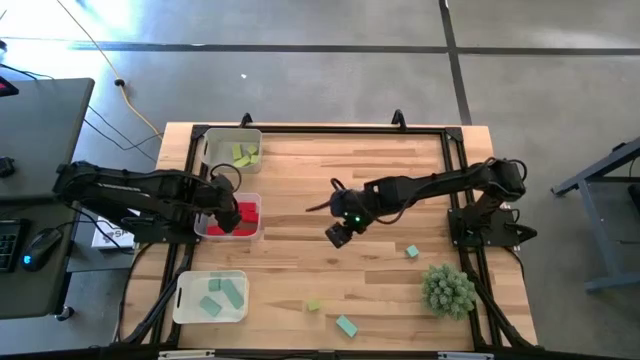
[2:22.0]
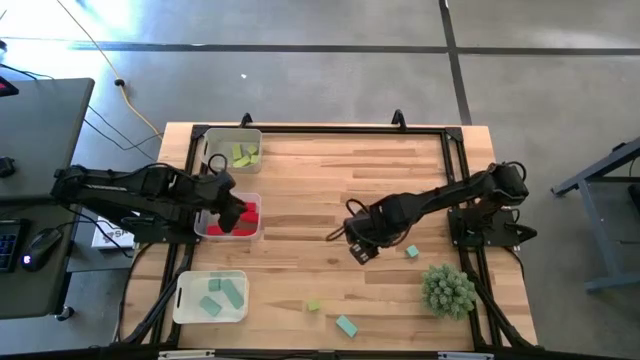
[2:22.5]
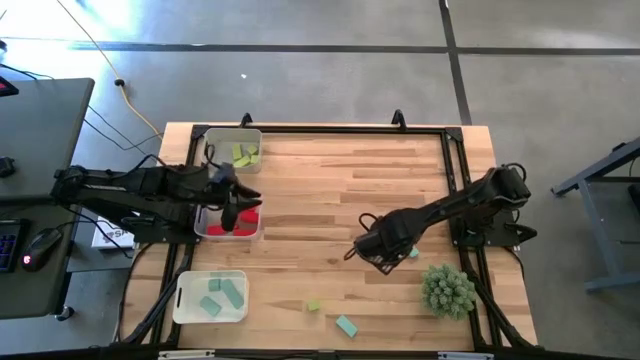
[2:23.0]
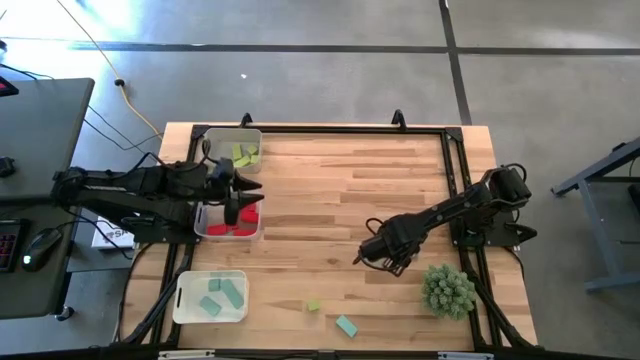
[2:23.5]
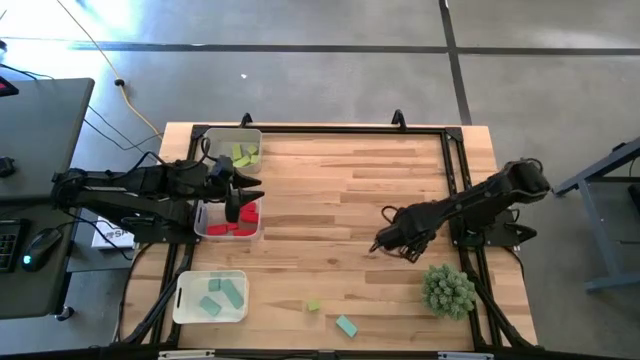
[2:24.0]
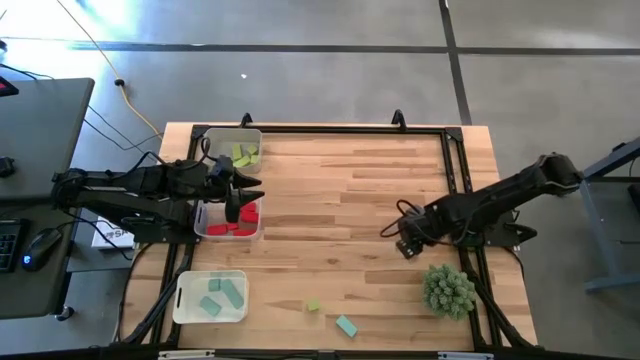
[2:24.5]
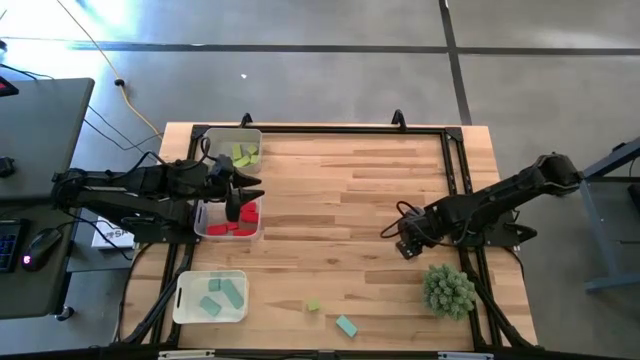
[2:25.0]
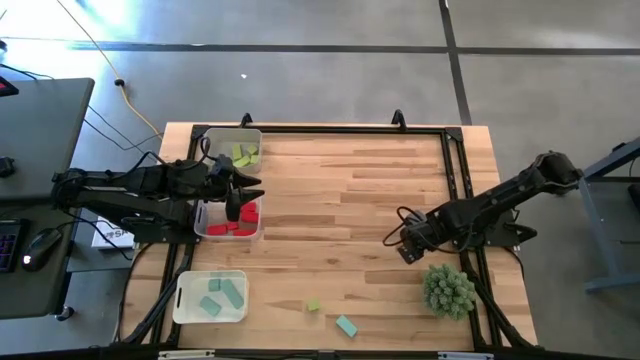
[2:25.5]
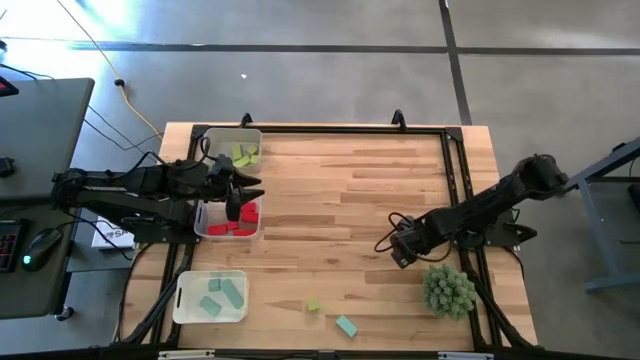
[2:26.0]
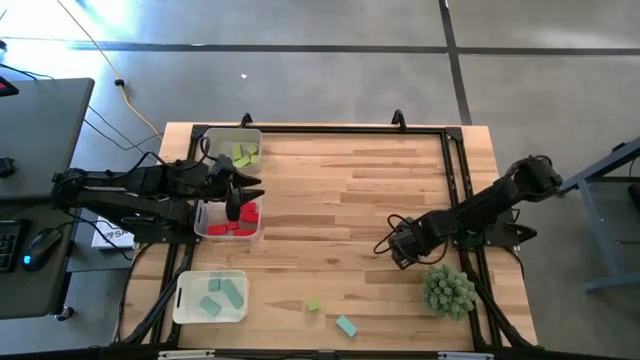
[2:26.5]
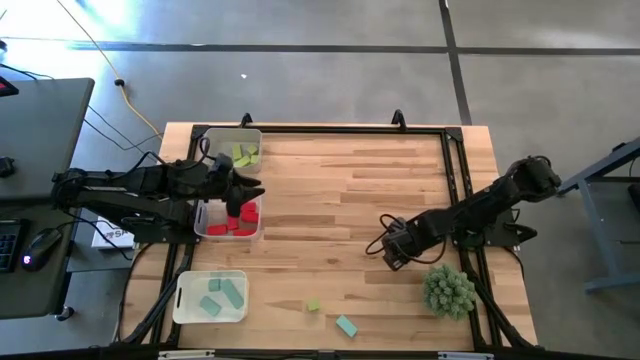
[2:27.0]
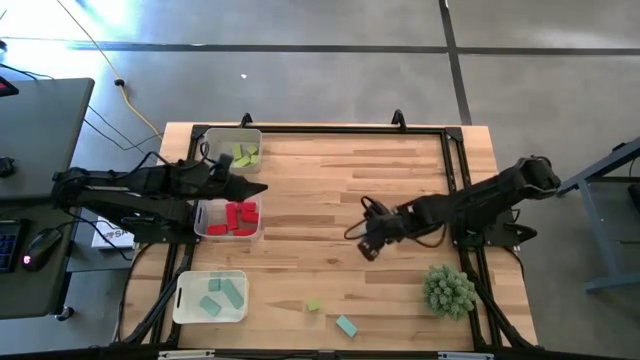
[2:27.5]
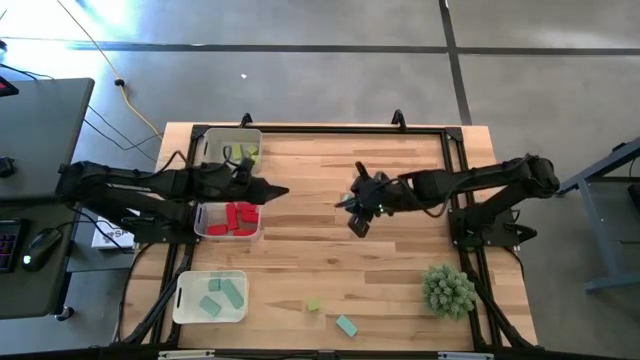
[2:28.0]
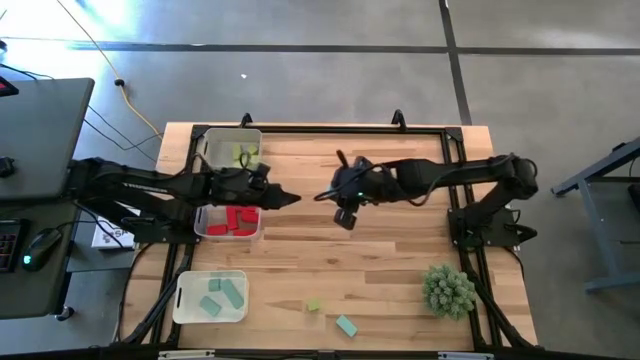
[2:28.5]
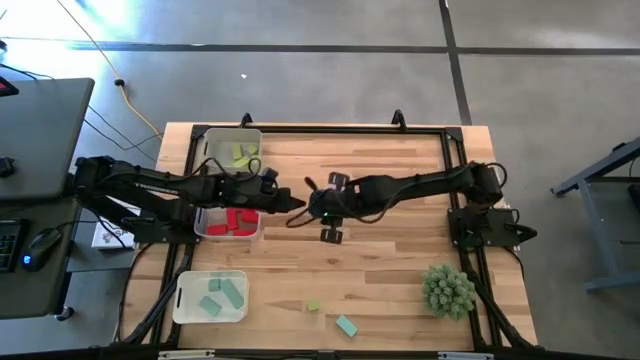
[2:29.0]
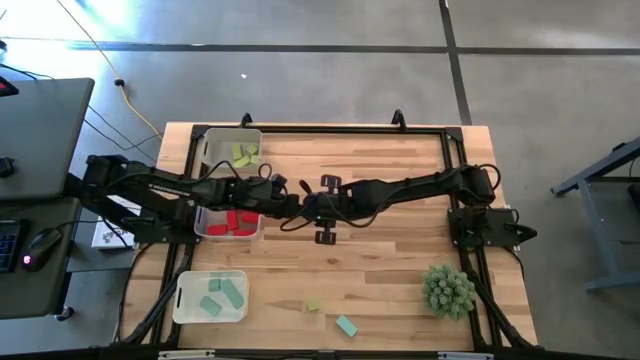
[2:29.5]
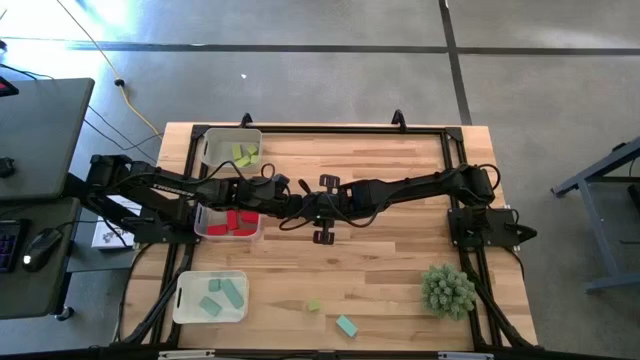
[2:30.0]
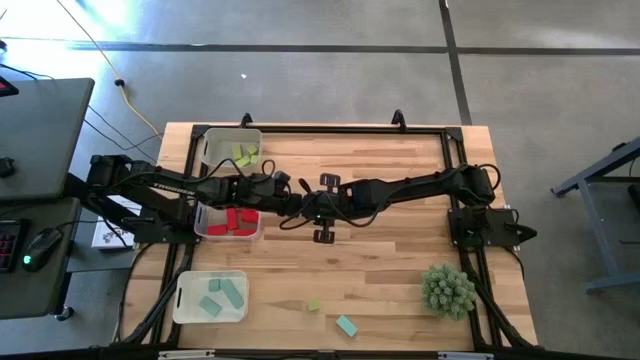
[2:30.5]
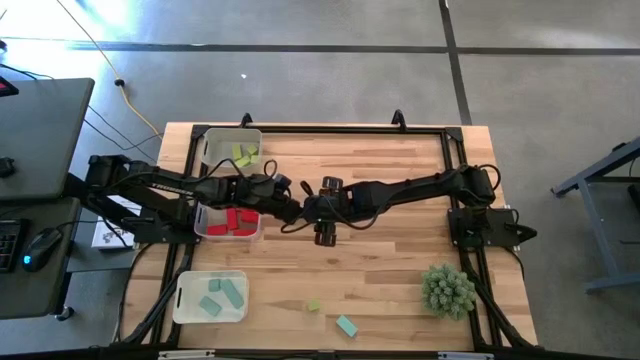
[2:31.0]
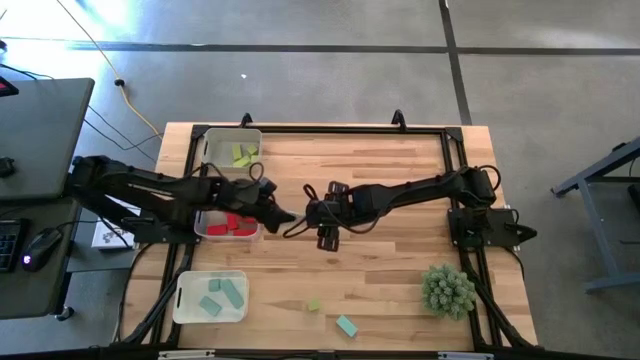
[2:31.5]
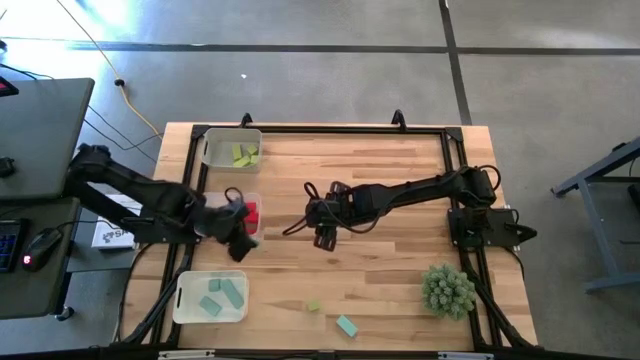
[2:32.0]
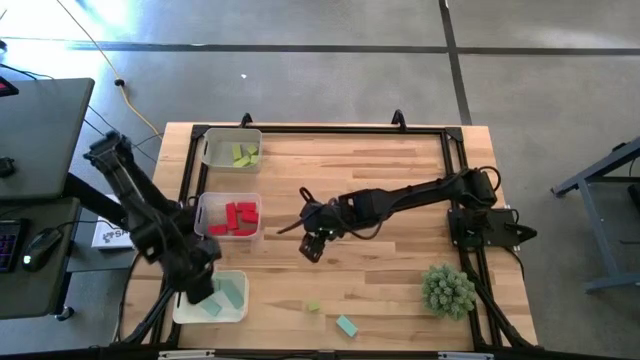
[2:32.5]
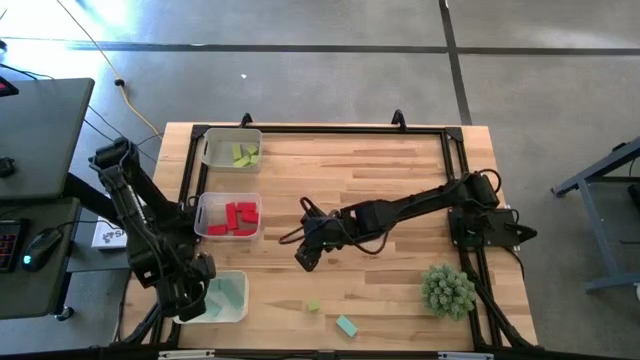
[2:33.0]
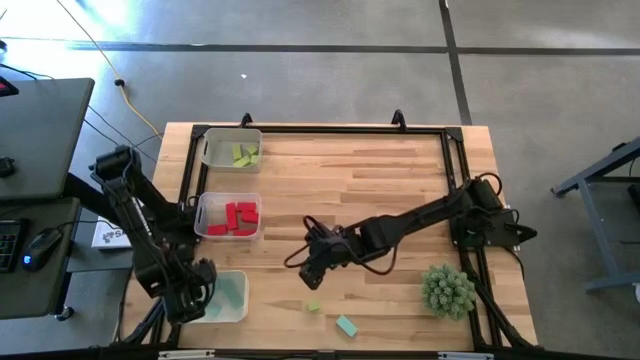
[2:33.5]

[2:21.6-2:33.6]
Task: Sort & place blocks by color
Put the light blue block into the white bin

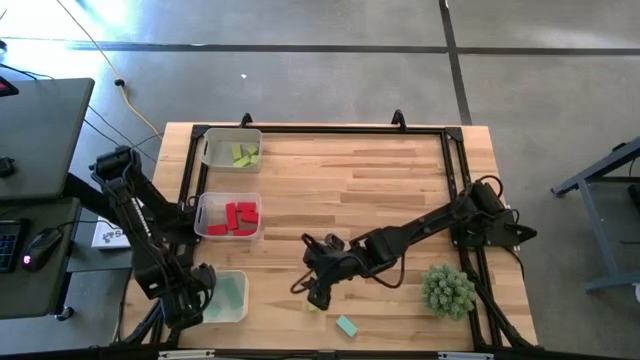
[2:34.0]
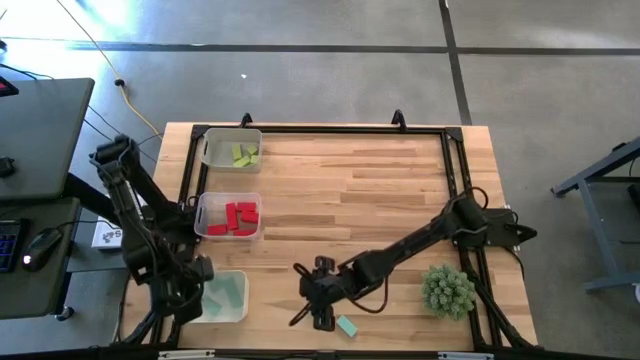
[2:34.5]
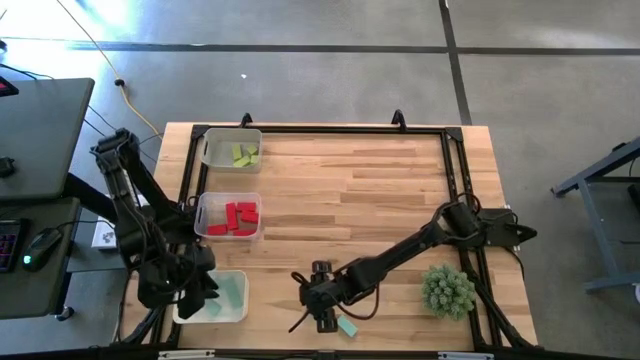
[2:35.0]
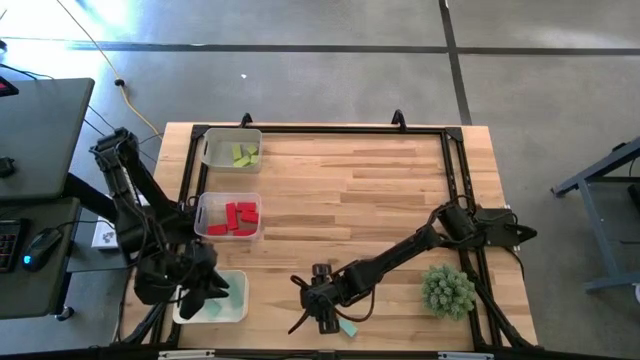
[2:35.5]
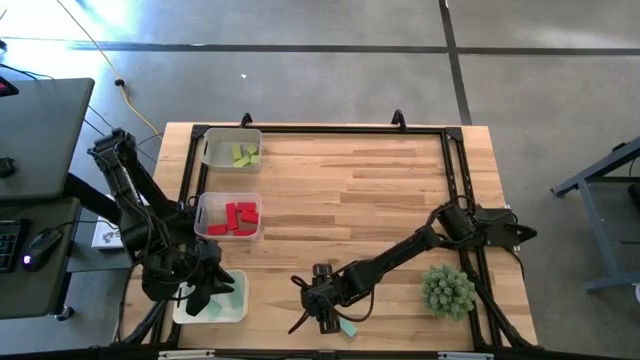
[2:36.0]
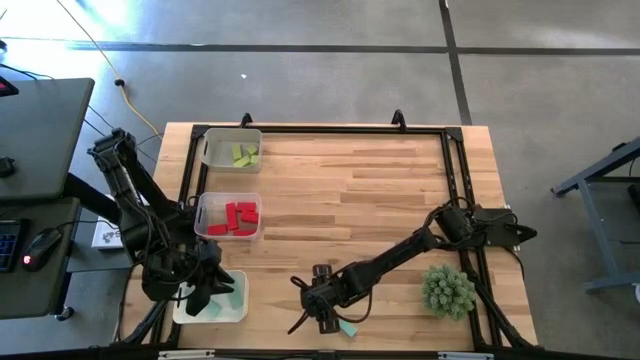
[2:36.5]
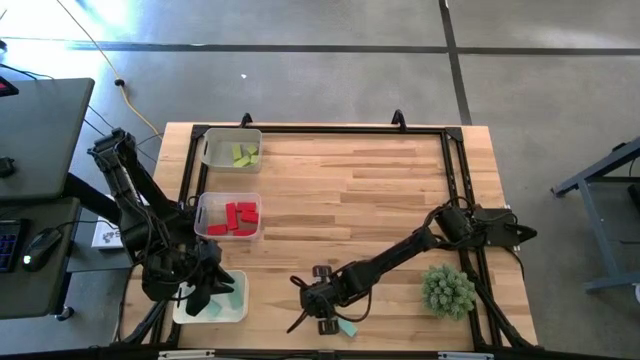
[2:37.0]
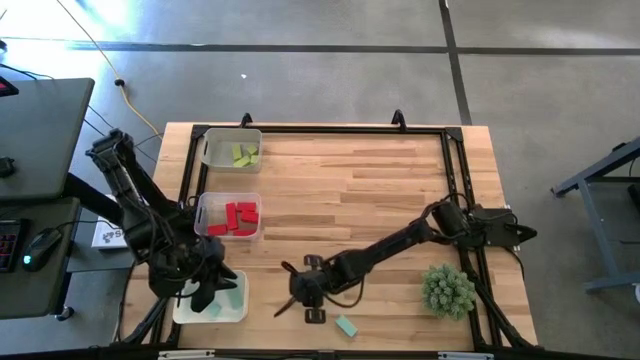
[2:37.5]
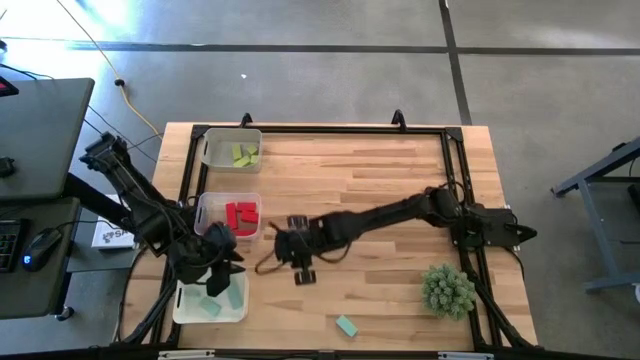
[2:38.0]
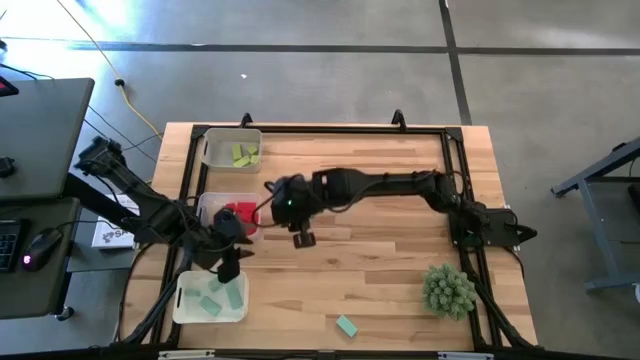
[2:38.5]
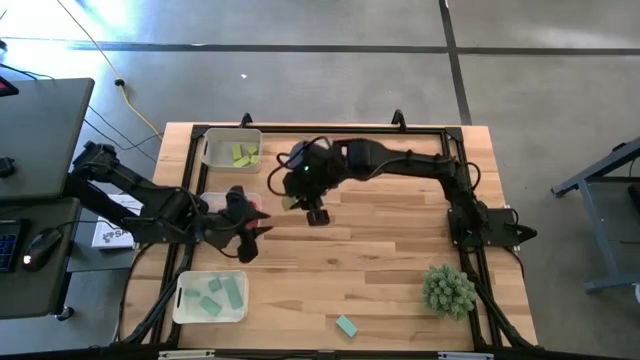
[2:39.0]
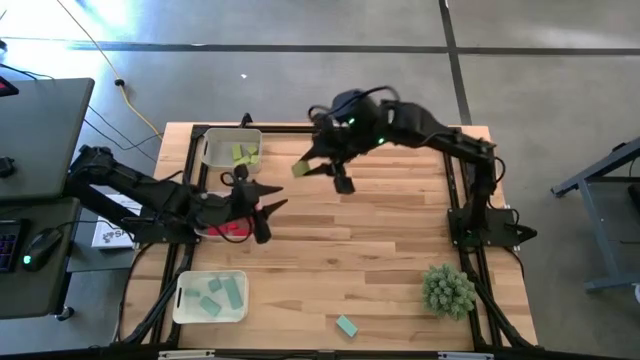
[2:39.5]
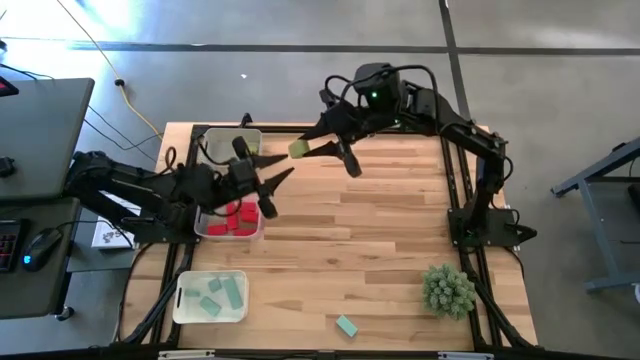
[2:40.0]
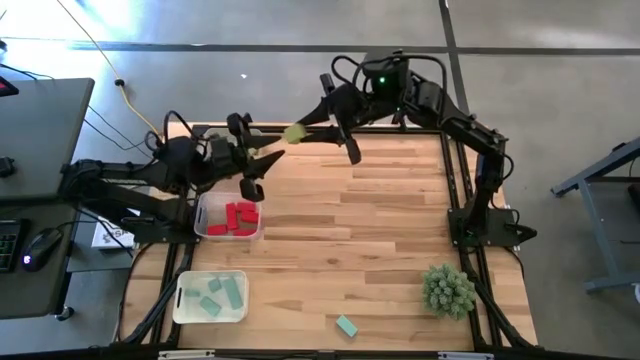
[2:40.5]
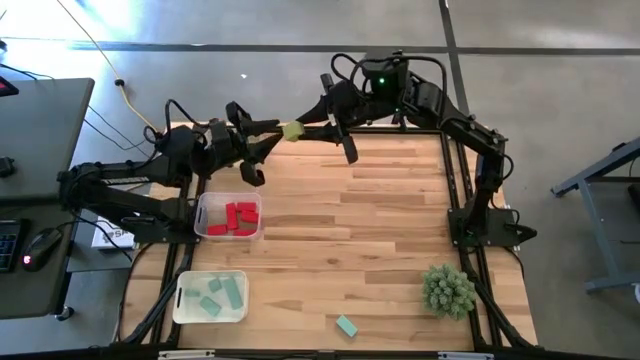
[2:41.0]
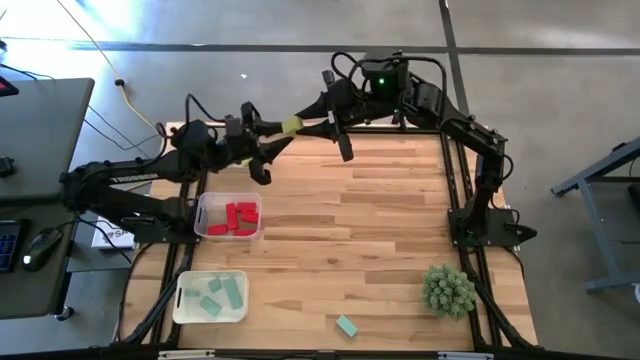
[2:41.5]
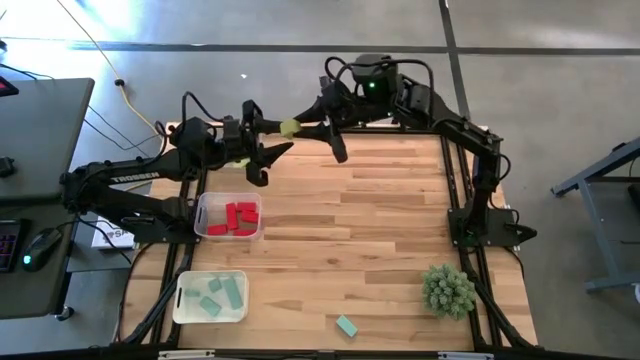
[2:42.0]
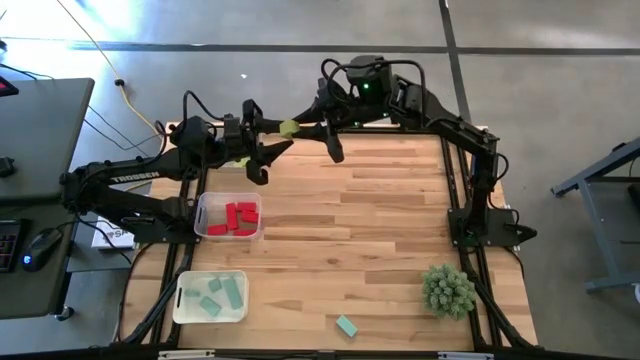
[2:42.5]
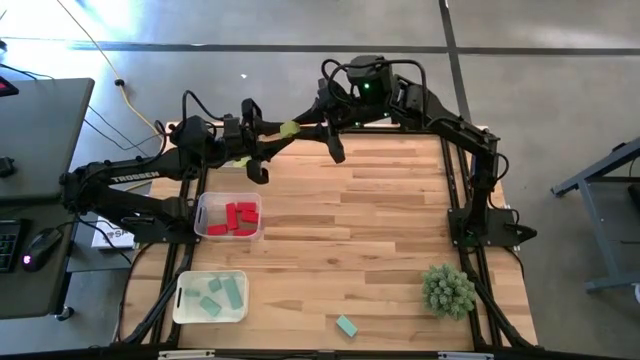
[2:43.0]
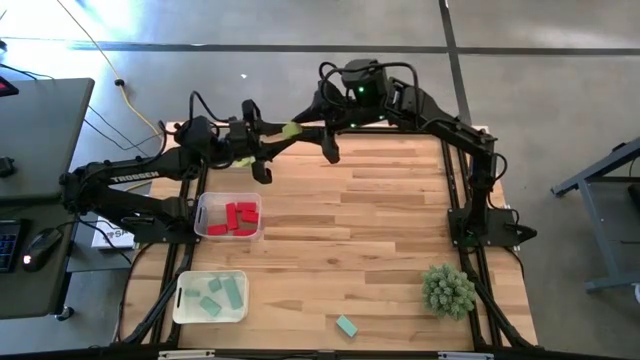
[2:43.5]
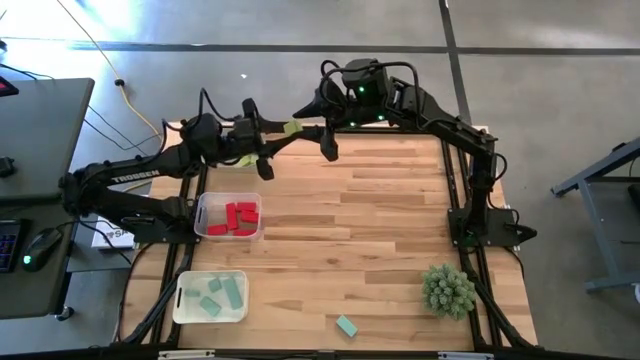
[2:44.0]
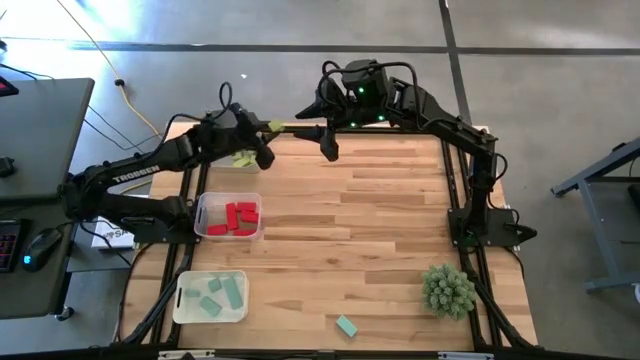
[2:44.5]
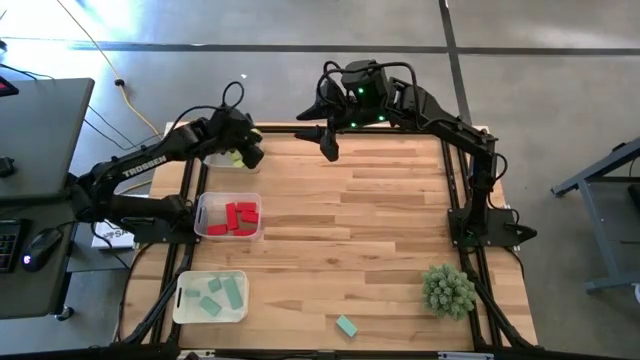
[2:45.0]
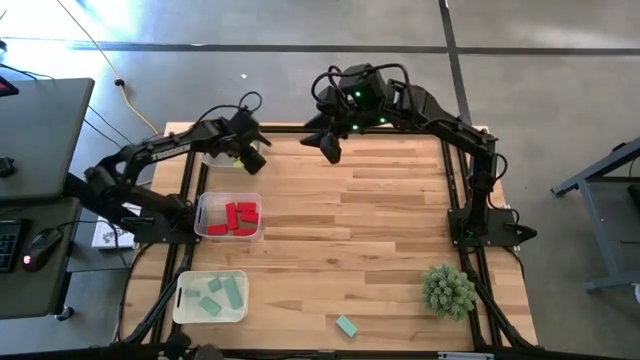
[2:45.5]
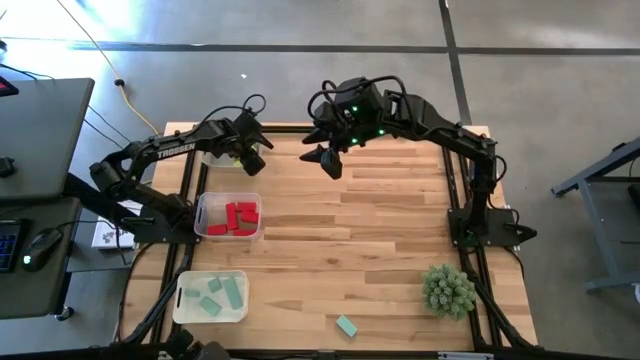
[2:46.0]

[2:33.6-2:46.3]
Put the light green block into the gray bin
